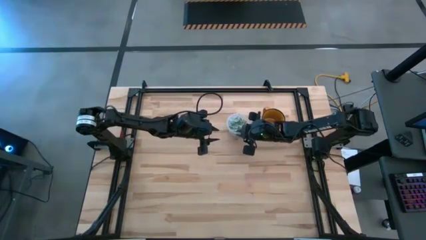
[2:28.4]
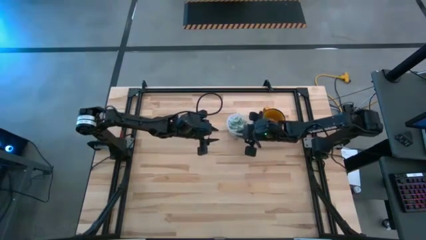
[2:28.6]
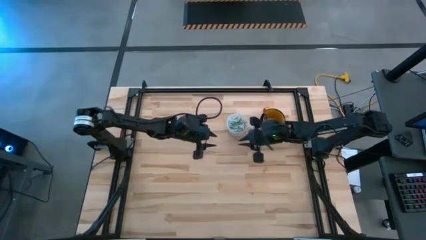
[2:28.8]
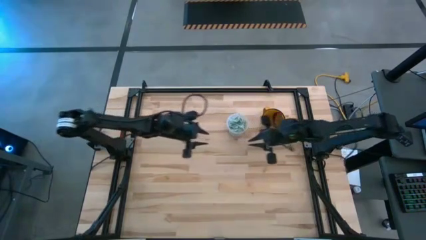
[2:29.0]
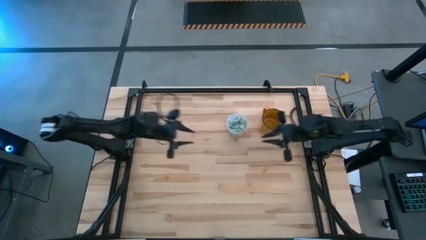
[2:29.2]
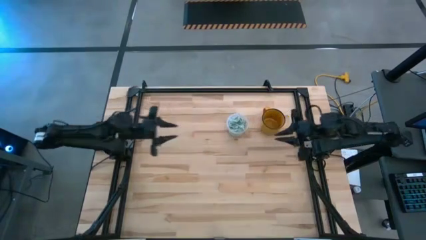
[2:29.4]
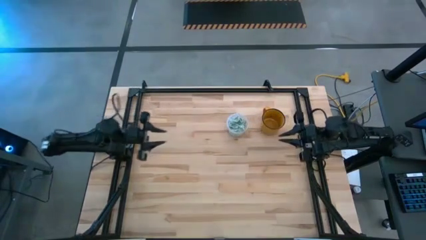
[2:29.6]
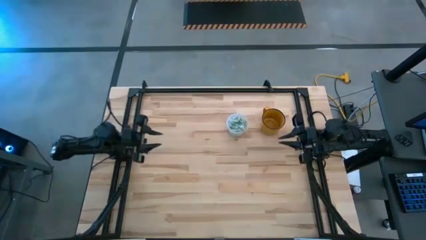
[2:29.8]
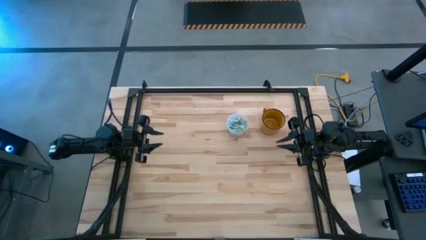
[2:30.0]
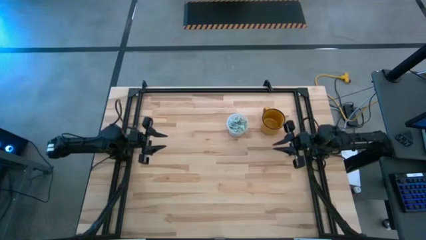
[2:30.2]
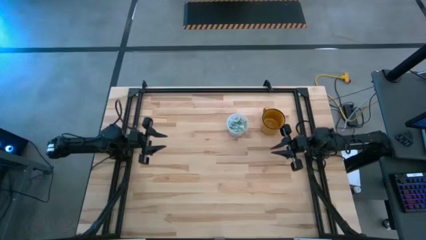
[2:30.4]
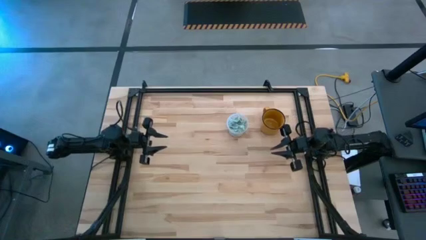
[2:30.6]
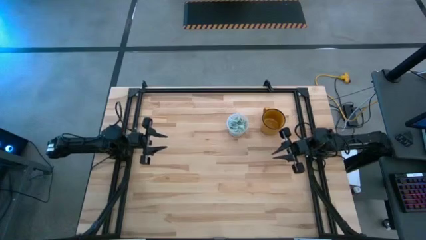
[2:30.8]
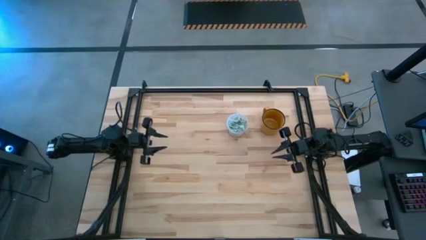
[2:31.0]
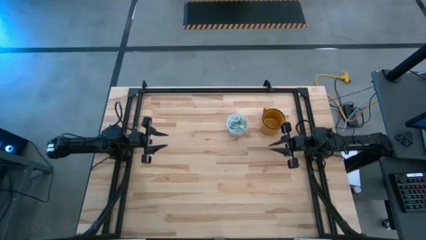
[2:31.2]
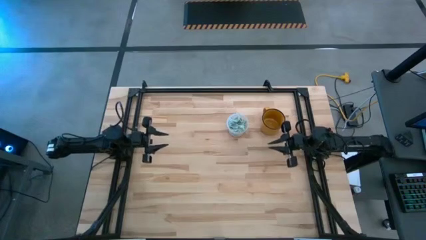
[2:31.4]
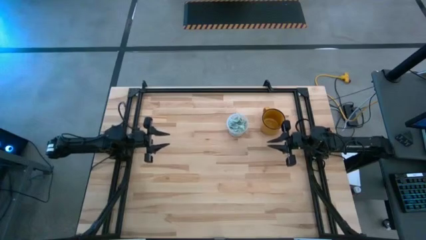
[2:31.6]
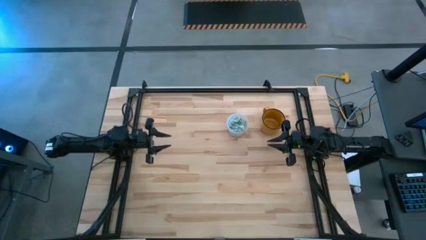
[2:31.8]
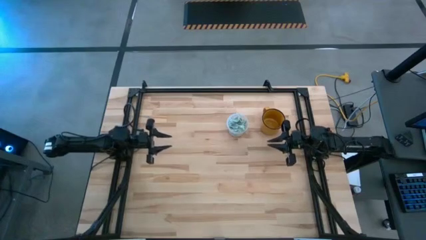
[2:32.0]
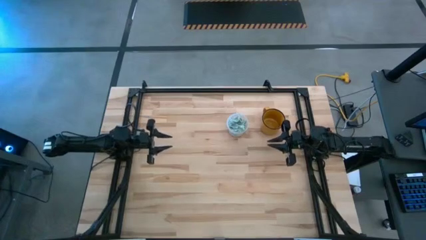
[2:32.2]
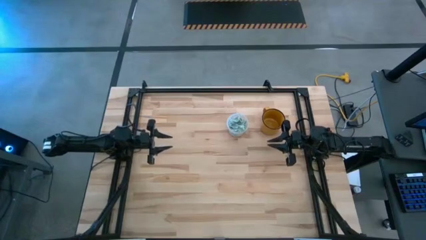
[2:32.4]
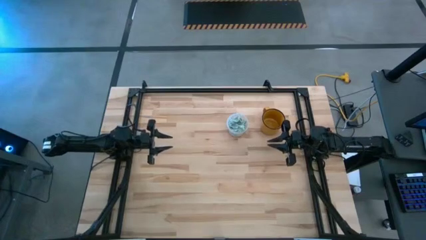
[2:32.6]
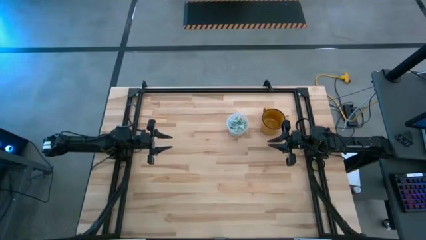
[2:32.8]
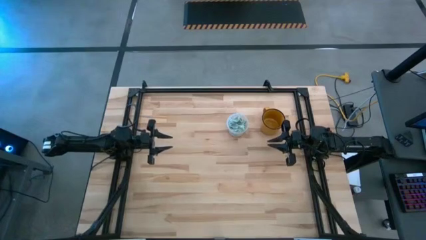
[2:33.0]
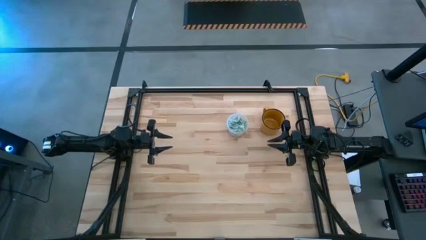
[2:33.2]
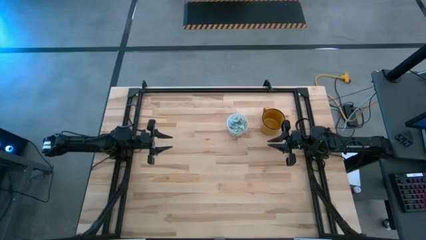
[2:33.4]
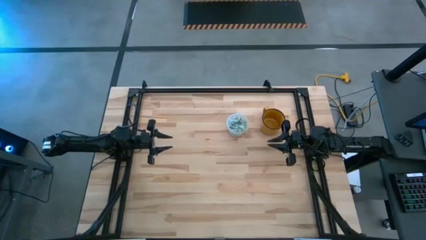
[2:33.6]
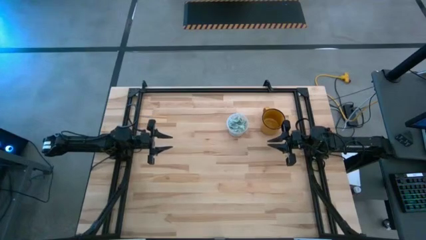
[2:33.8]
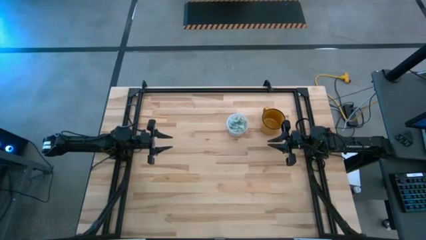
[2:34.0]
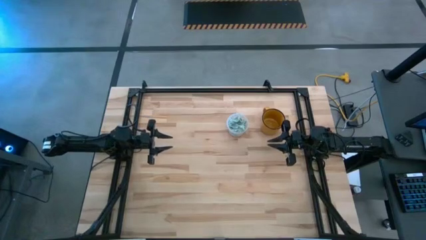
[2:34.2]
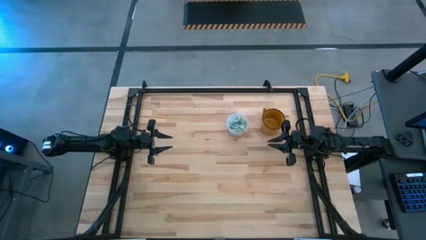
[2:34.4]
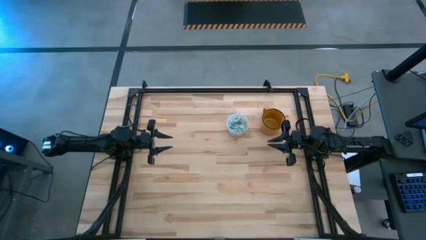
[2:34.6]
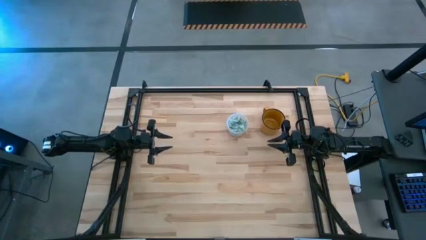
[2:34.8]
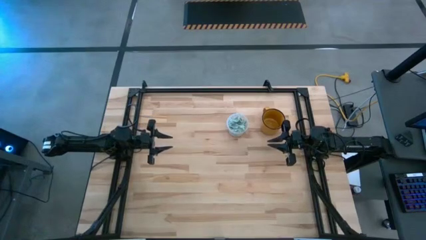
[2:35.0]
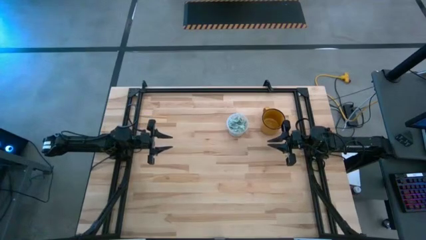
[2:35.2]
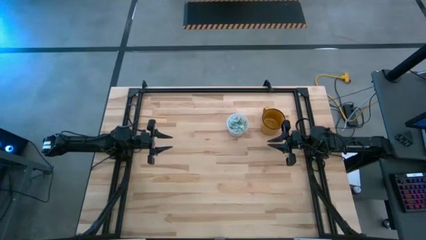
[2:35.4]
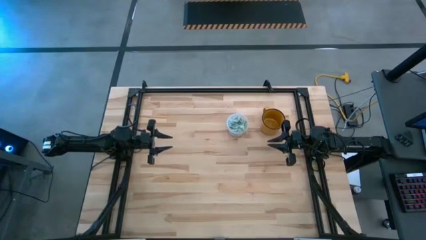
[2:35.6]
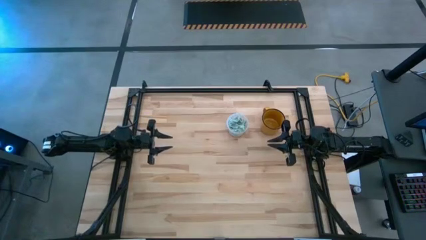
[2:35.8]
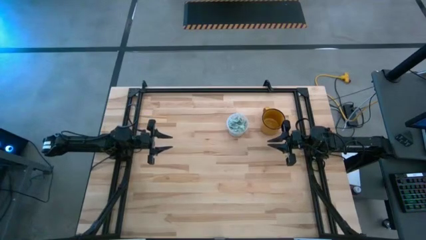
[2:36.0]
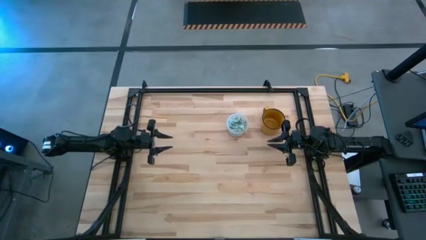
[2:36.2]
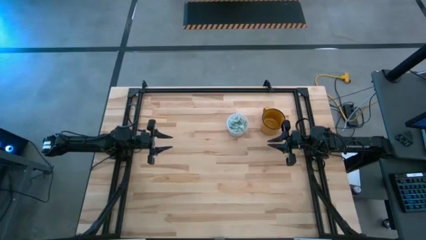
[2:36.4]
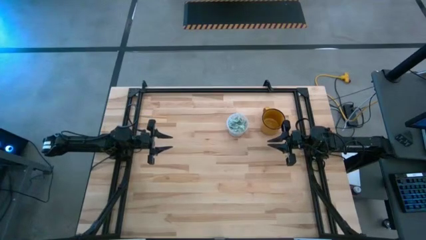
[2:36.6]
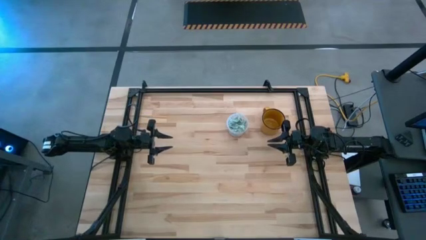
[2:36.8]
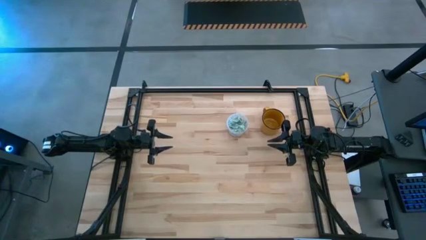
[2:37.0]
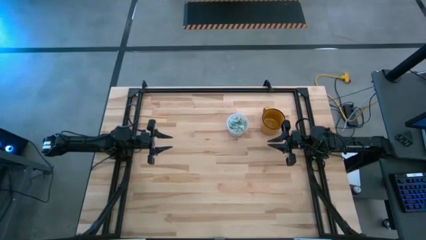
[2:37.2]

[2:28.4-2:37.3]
Task: Pick and place Stevia / Truvia into bins
Return to Home Position

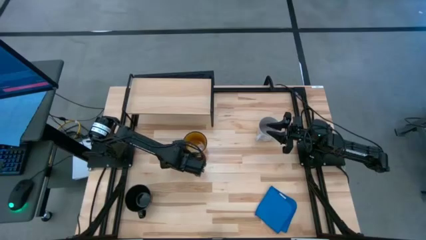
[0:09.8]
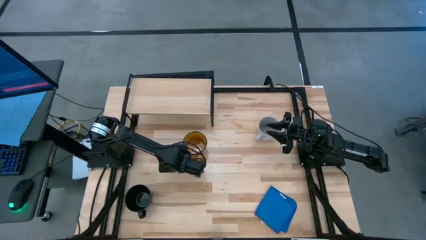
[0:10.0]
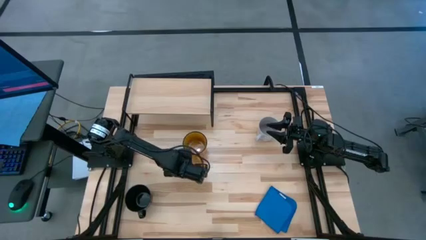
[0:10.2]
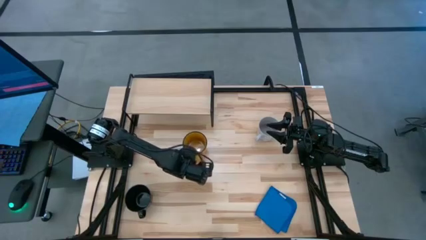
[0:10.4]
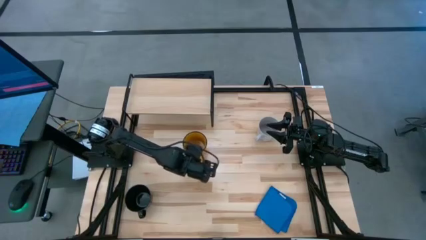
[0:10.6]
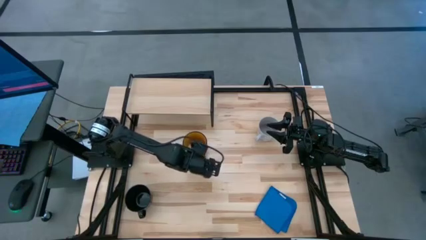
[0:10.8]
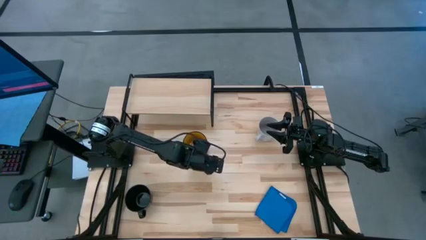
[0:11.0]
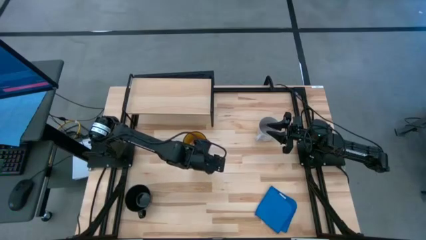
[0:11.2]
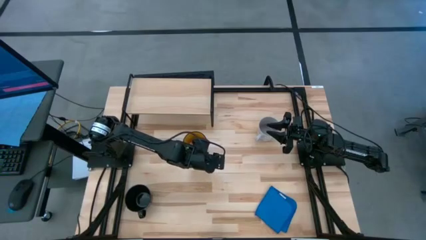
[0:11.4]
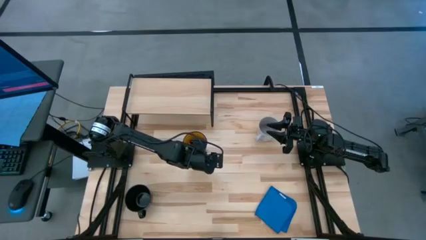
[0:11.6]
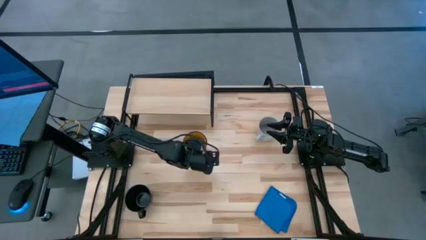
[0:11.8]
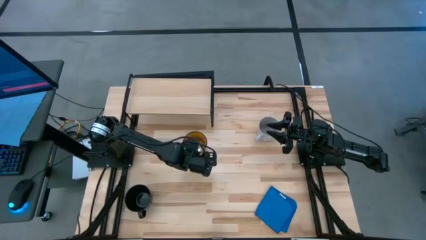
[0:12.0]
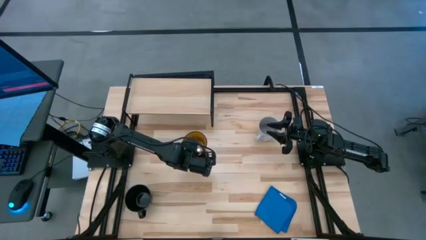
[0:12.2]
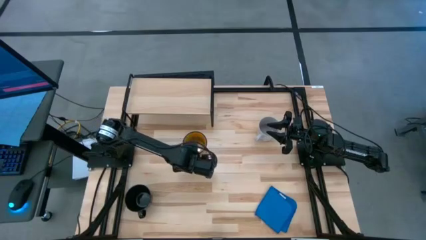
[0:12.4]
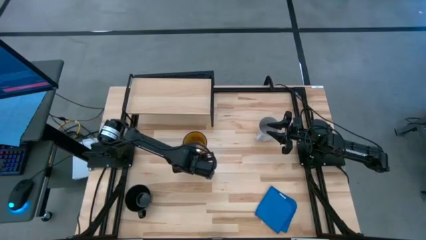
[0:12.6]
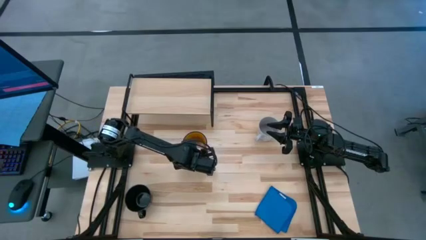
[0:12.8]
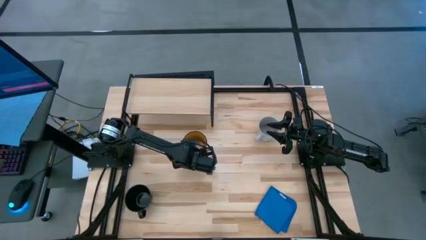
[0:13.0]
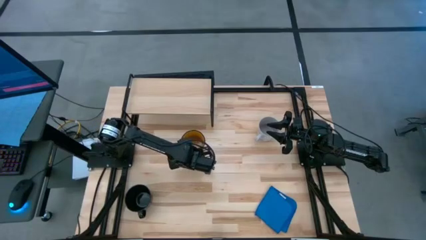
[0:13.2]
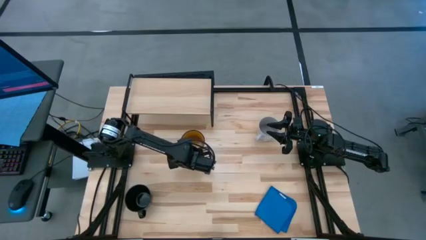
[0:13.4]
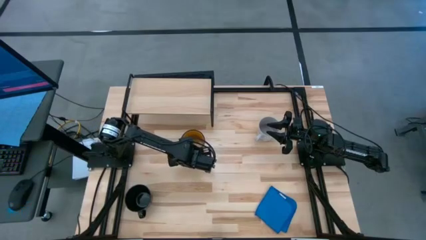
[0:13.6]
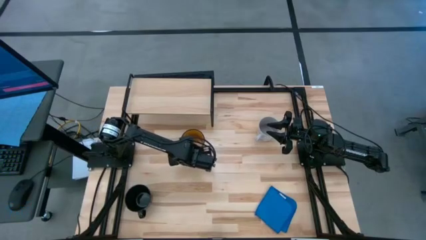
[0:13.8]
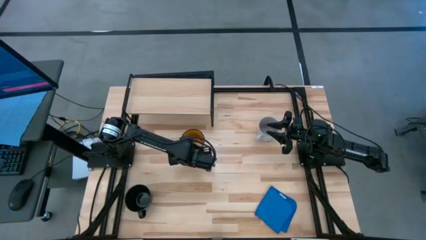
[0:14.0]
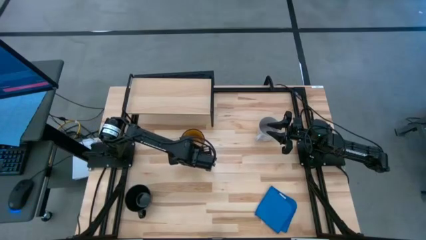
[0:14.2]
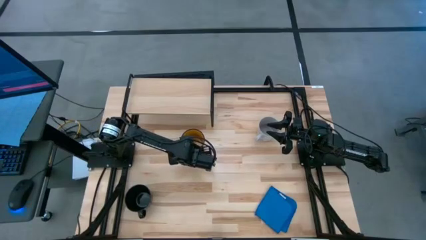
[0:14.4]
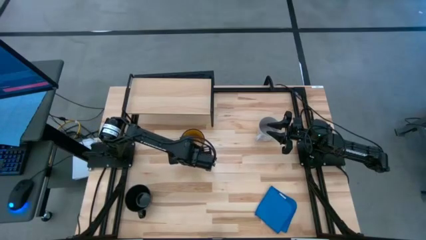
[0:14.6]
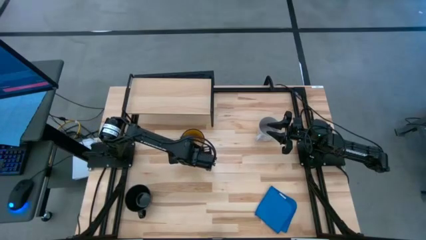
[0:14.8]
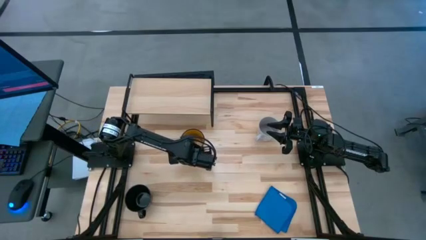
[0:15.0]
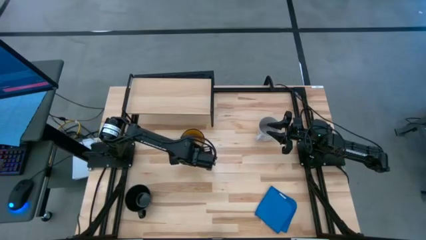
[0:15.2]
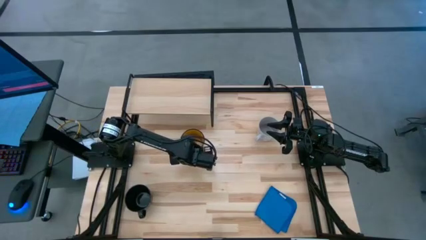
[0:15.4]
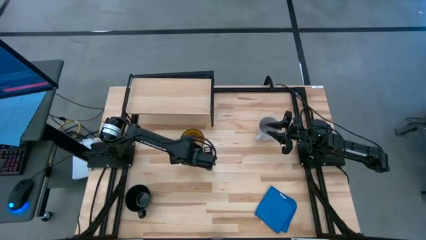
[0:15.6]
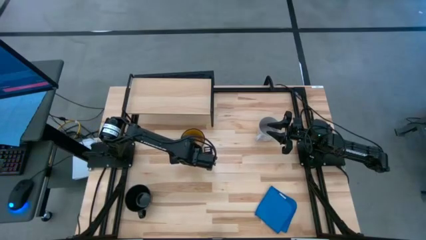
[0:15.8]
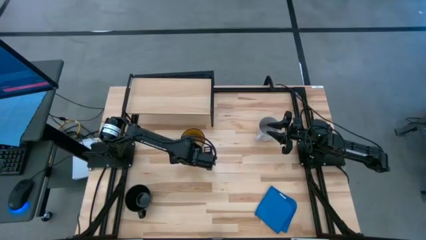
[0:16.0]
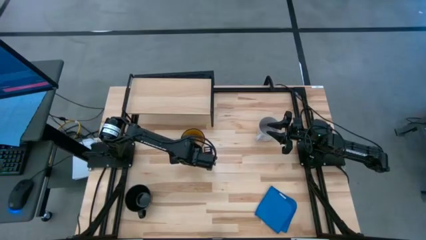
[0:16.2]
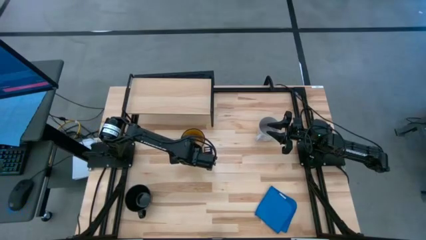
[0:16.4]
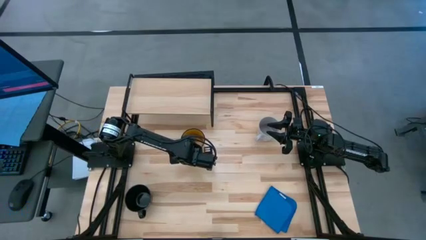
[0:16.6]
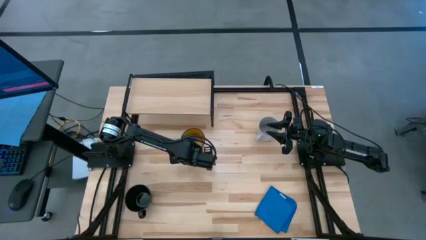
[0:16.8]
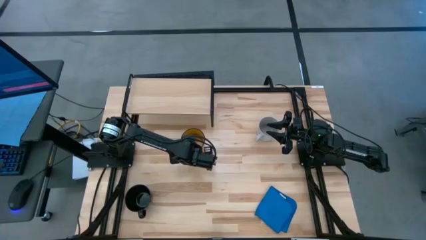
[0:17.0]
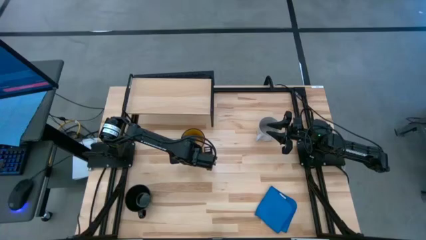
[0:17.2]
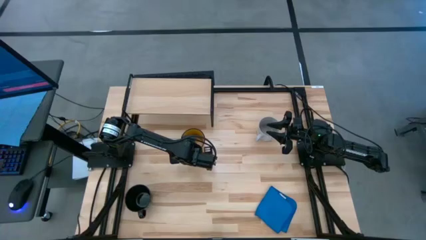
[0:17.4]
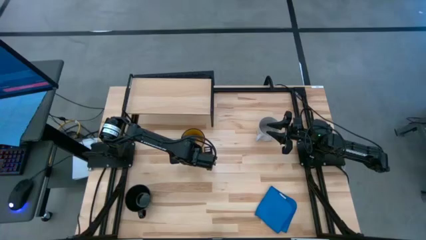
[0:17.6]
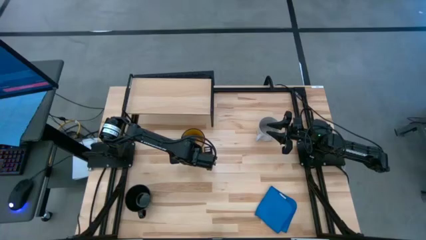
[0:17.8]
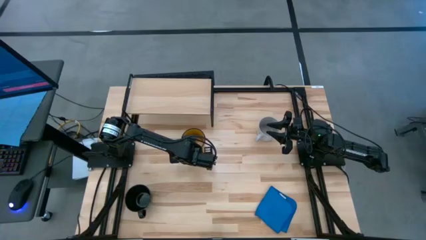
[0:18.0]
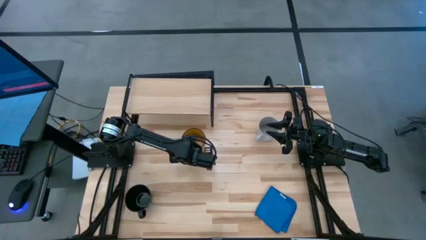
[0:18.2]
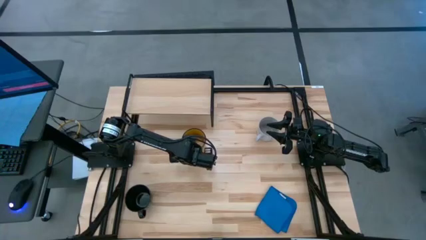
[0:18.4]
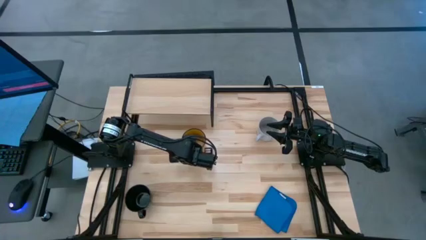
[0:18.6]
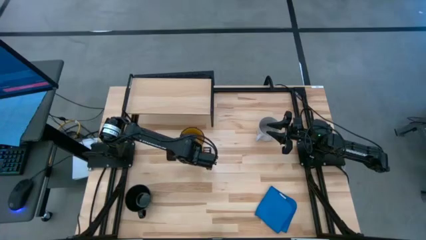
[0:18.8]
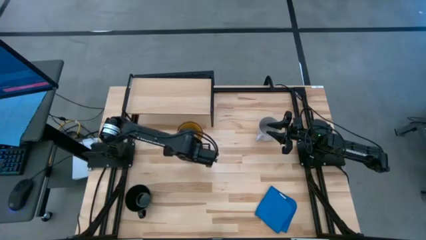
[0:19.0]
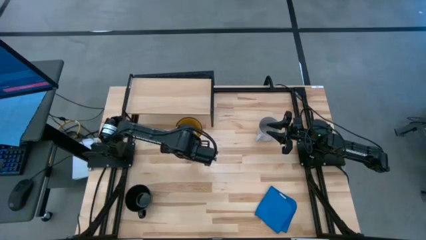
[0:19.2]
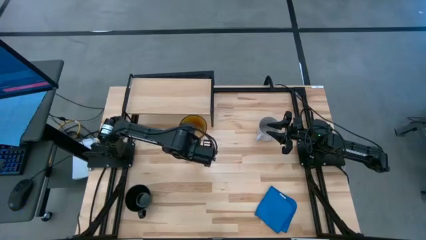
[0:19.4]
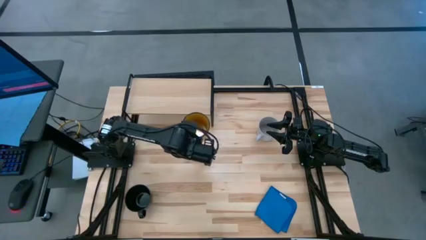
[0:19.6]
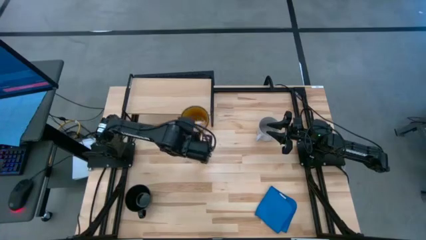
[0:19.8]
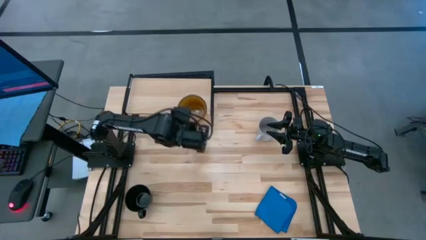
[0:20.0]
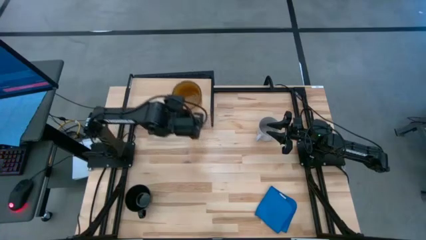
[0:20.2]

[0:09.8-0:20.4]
Task: Stack small to large cups/mugs on shelf
Put the yellow mug on the shelf
